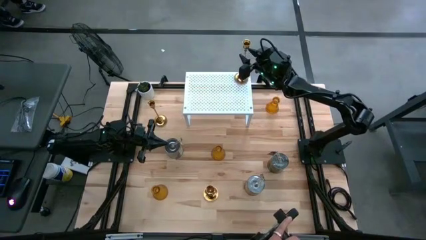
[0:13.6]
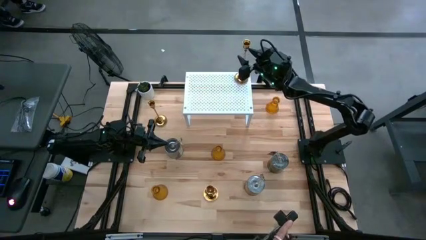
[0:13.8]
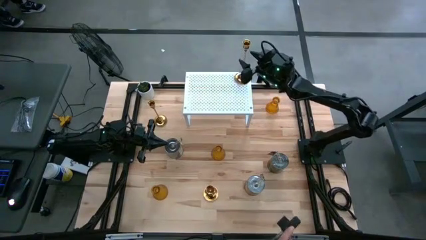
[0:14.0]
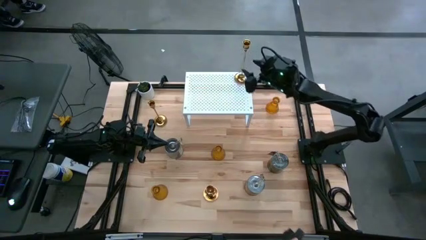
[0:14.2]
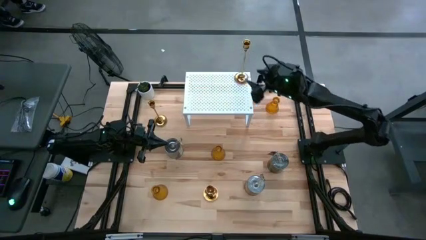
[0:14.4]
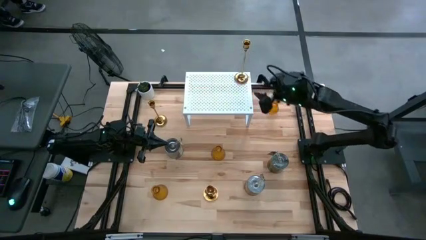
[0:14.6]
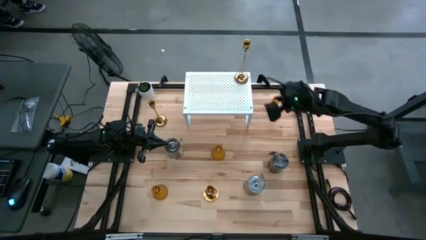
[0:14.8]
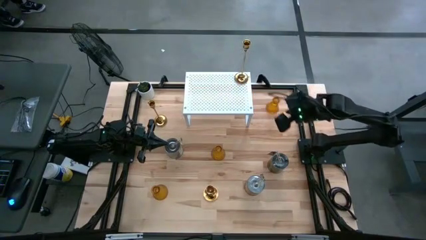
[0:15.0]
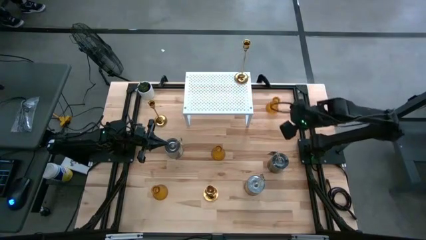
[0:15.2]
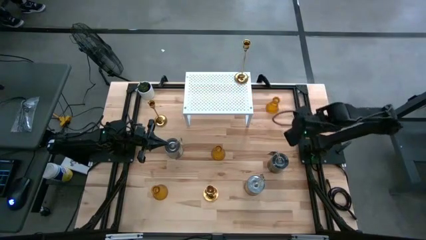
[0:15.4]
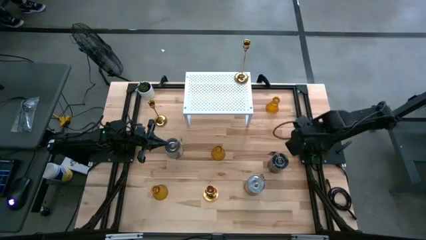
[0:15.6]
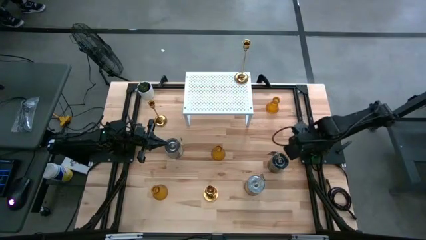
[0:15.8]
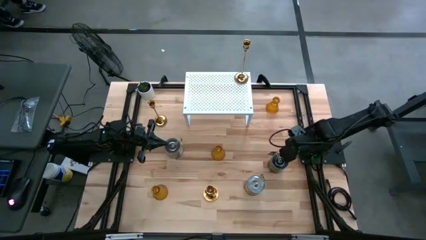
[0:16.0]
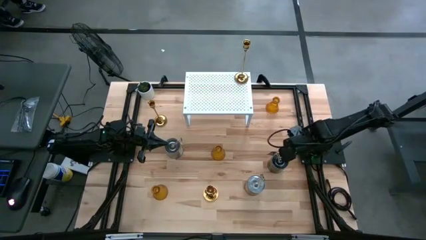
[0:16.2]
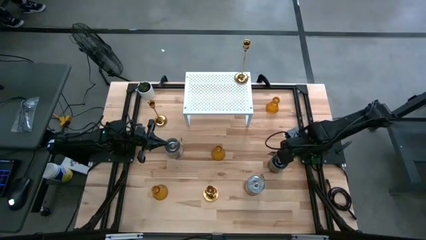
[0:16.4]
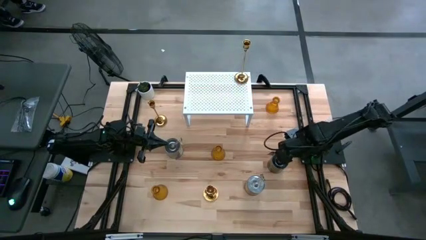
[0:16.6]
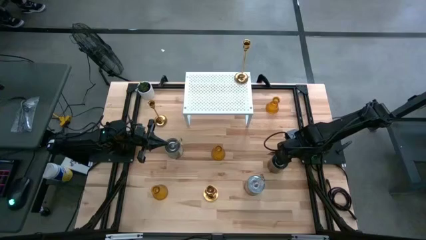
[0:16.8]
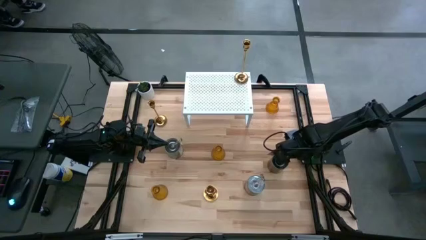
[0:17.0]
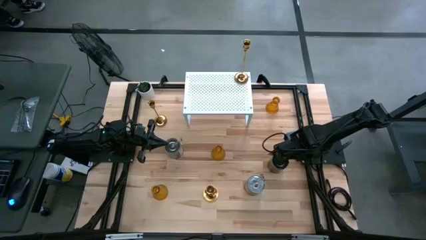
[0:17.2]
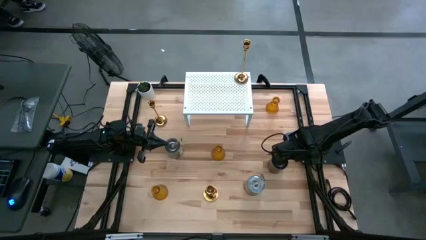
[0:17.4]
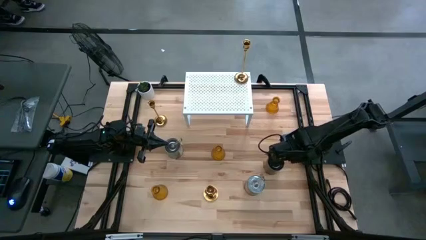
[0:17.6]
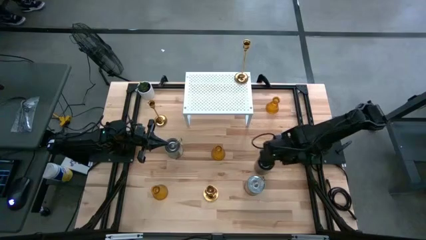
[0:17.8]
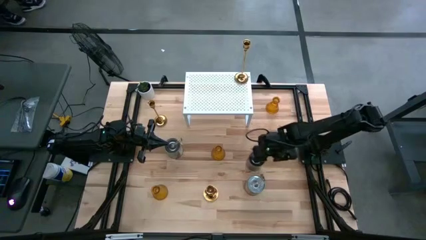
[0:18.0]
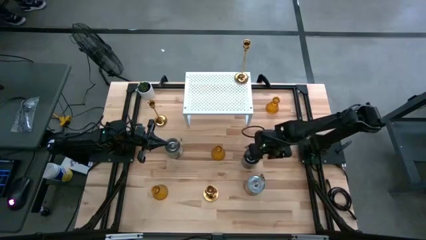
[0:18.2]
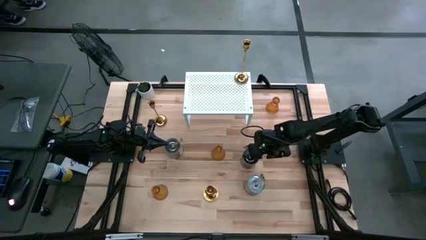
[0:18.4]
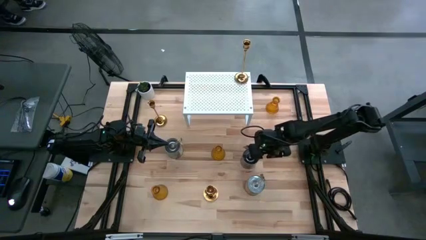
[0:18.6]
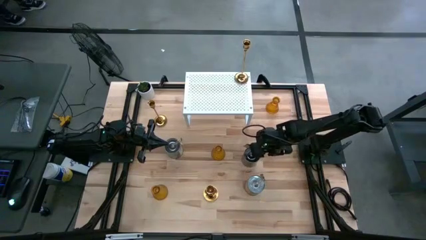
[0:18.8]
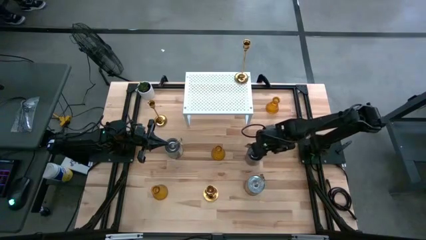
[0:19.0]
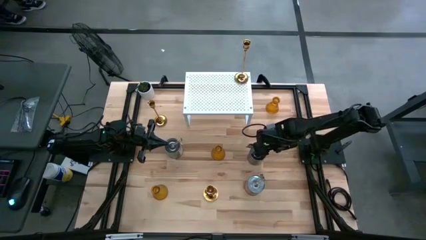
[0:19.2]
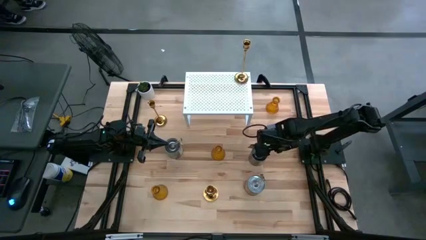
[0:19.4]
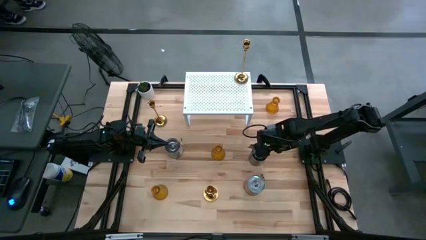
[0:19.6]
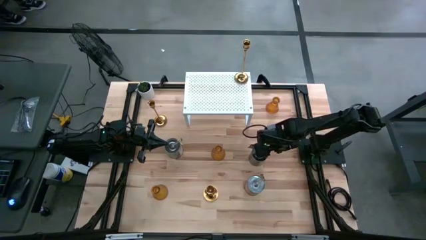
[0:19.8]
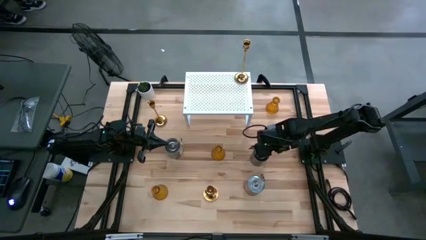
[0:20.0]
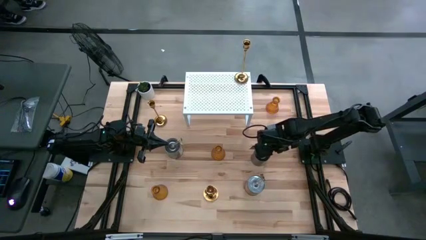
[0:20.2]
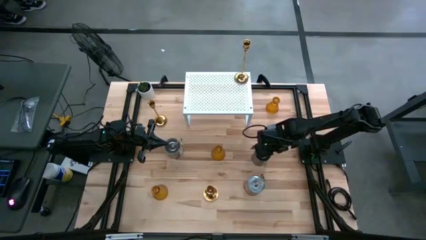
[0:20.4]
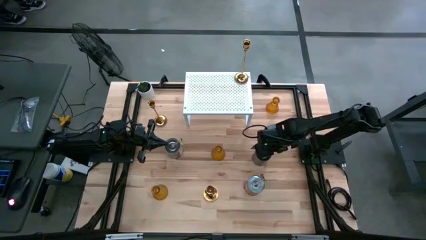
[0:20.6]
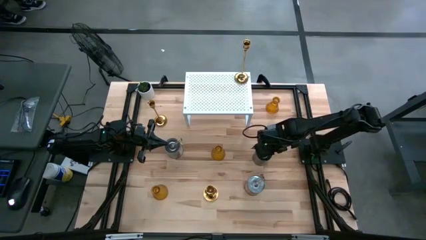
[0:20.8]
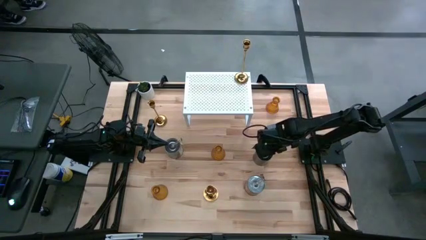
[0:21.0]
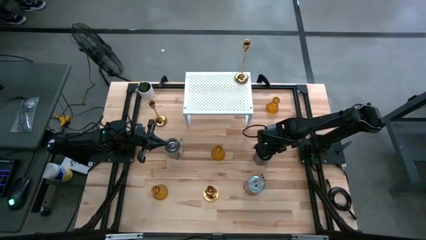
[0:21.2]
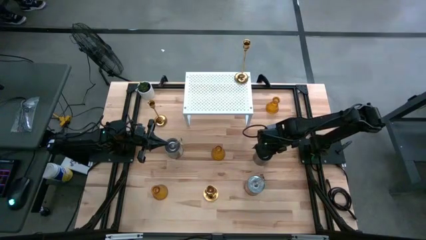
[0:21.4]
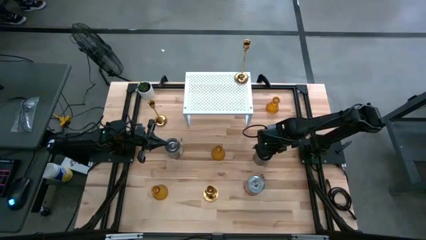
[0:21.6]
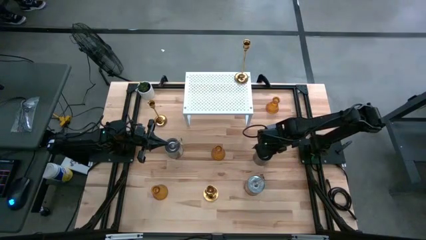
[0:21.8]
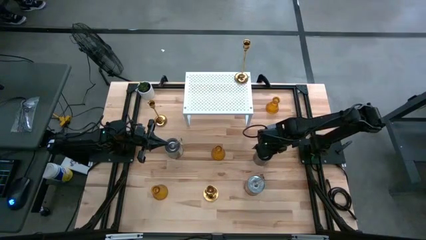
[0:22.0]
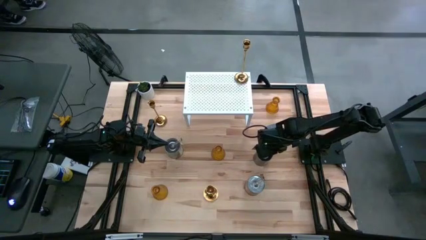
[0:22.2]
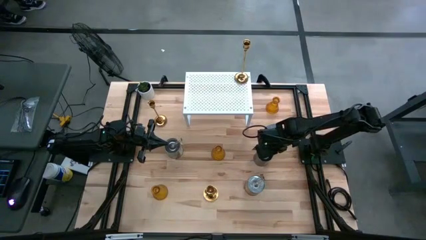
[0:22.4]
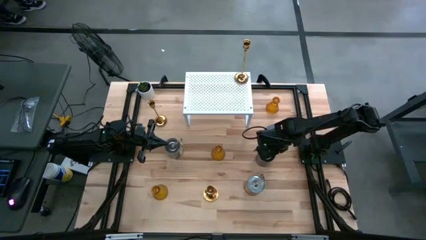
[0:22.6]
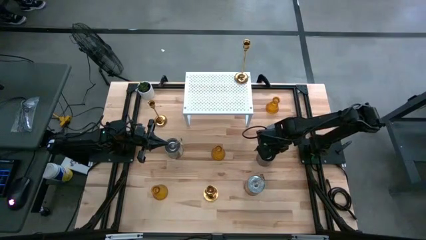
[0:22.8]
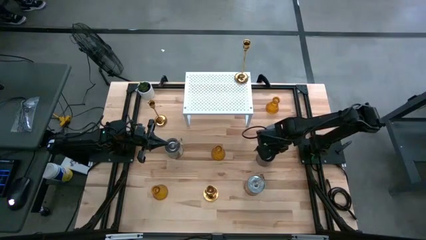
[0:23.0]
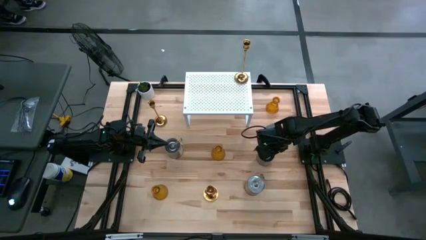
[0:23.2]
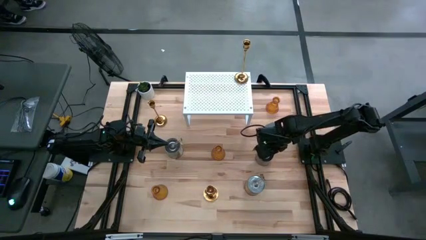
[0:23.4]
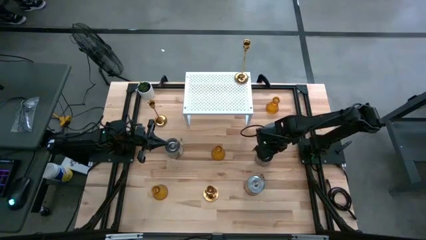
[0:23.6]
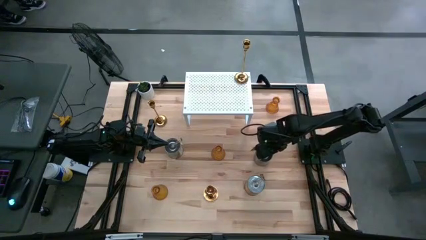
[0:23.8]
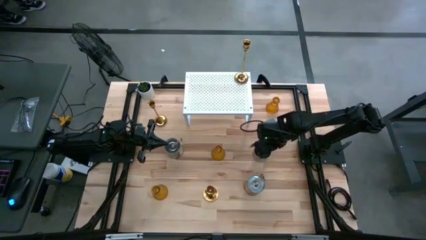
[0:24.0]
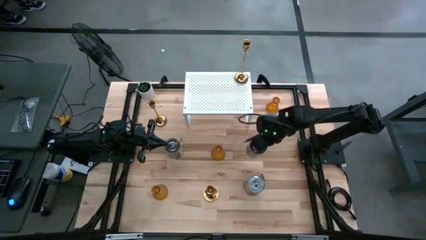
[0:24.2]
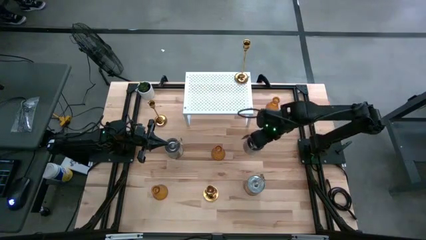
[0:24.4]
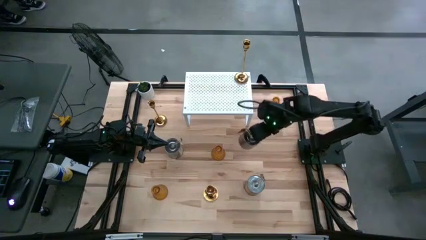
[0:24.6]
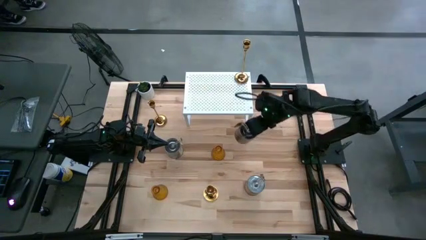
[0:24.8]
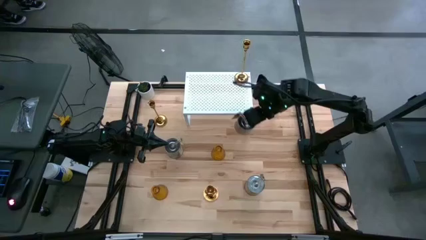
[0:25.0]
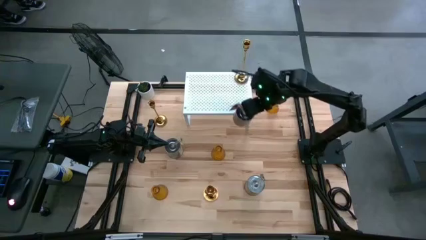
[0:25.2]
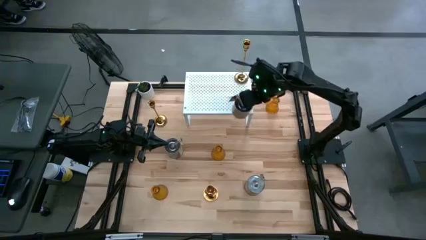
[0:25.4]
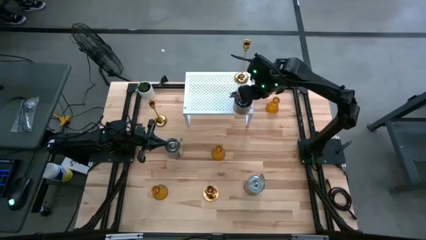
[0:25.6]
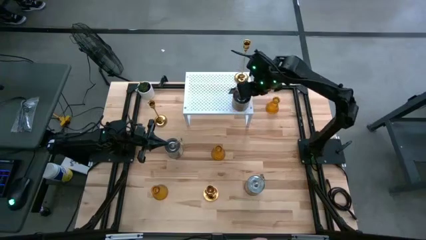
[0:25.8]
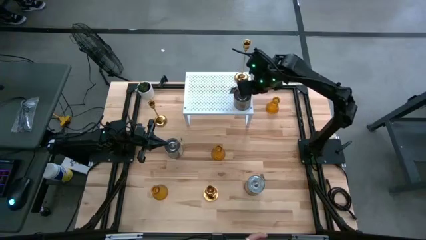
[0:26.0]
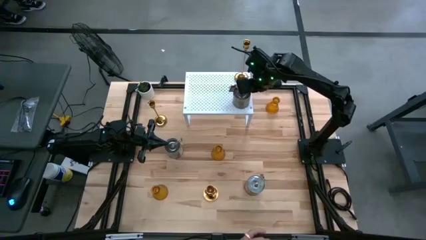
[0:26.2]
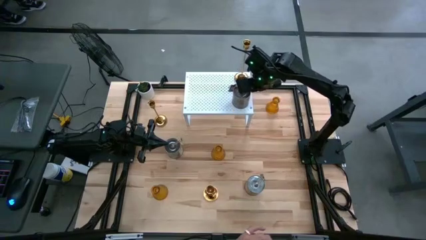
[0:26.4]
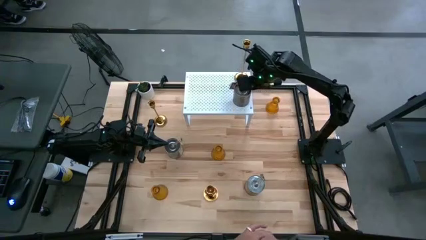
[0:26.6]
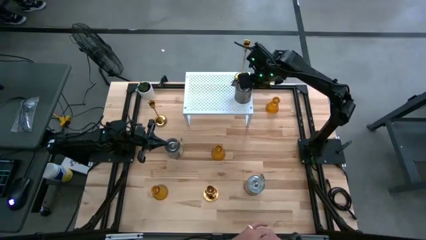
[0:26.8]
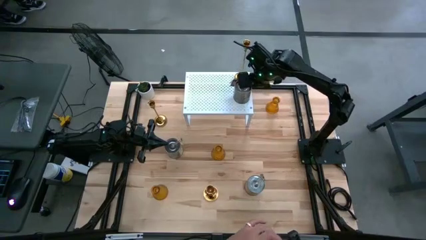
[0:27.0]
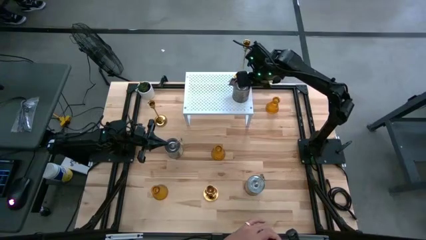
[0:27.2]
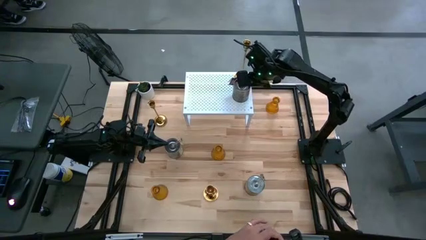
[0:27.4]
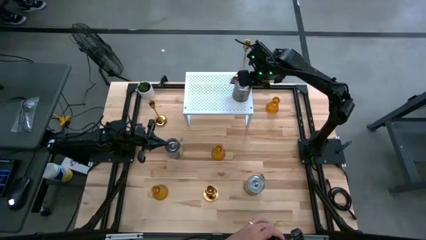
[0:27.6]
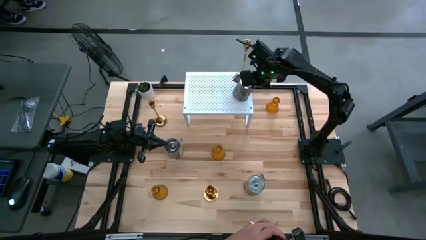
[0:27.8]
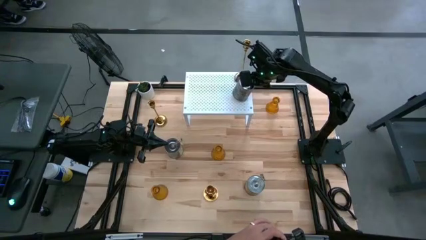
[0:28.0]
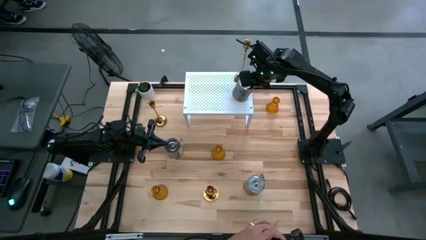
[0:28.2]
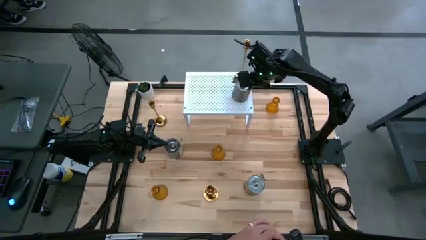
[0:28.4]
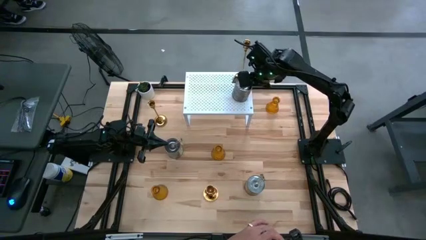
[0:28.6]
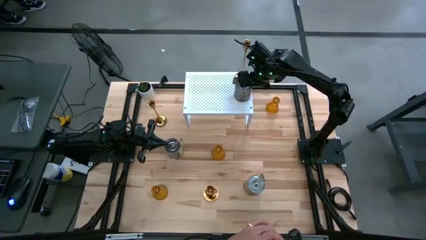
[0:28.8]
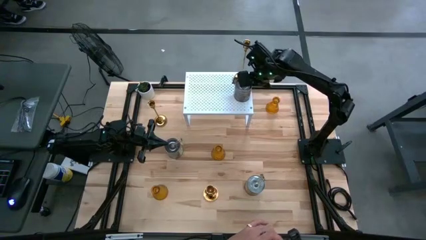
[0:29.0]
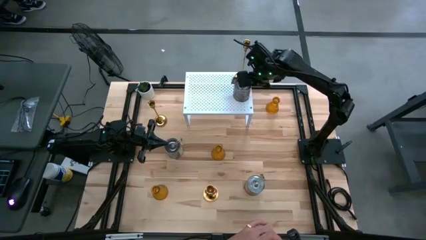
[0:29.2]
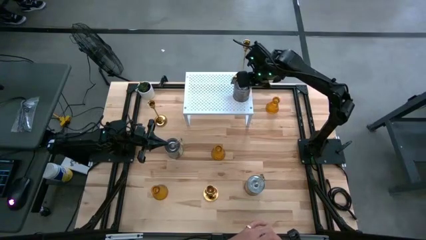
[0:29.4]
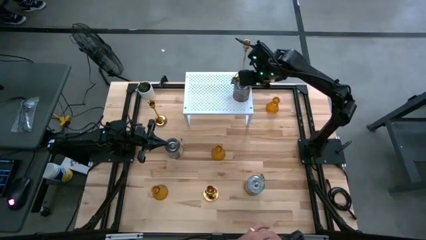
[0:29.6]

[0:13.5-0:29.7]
Task: Pick & Place candle stick holders
Put the brown and silver scented candle on the shelf
